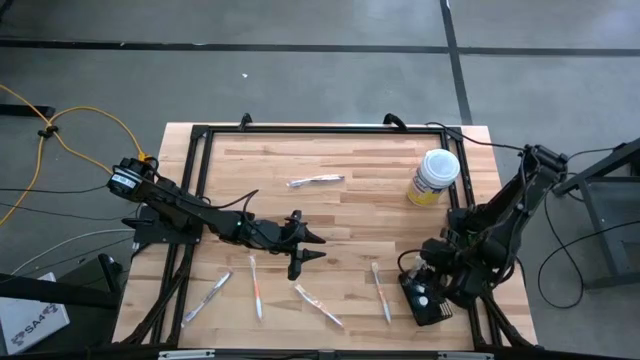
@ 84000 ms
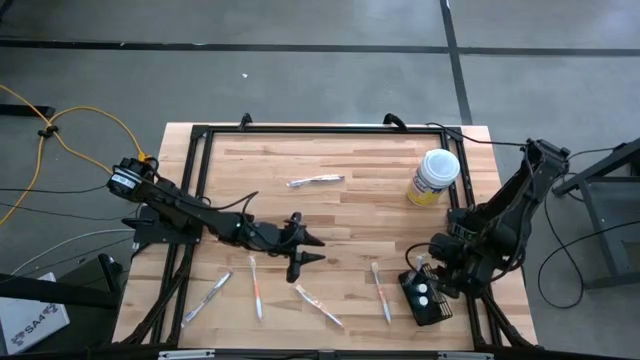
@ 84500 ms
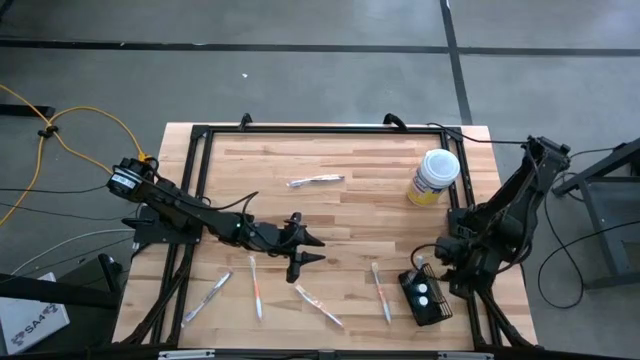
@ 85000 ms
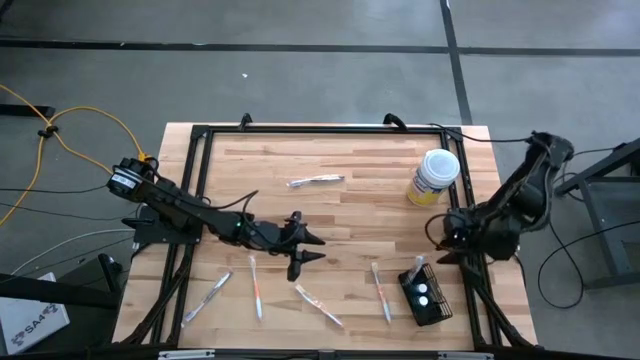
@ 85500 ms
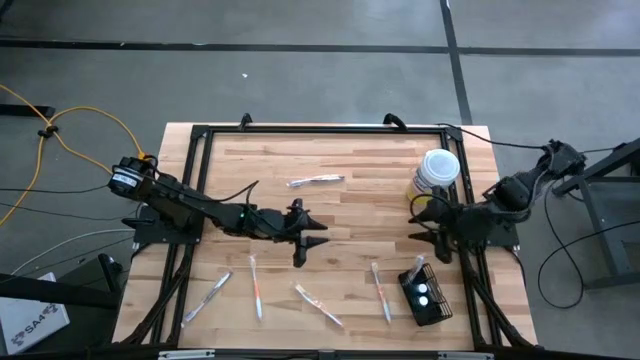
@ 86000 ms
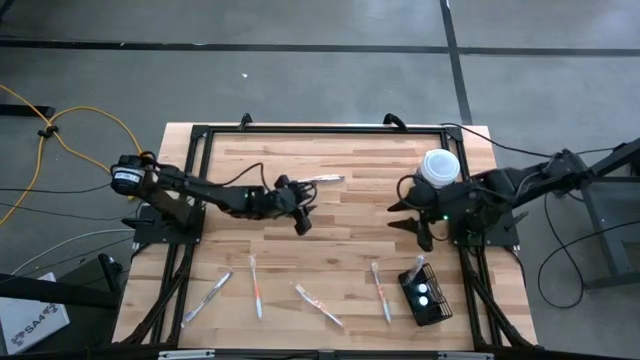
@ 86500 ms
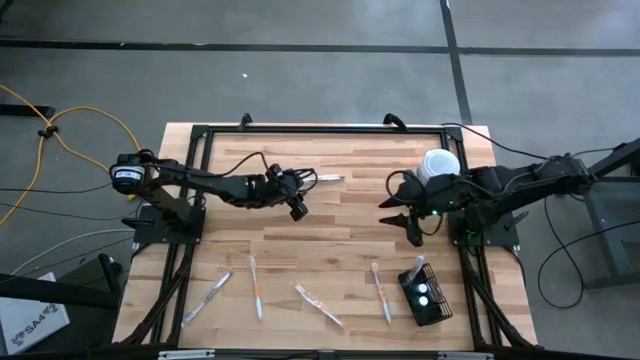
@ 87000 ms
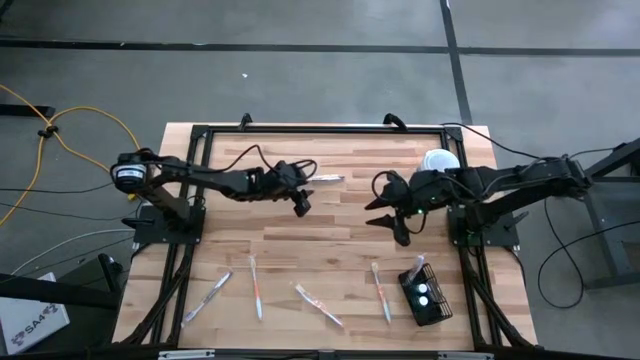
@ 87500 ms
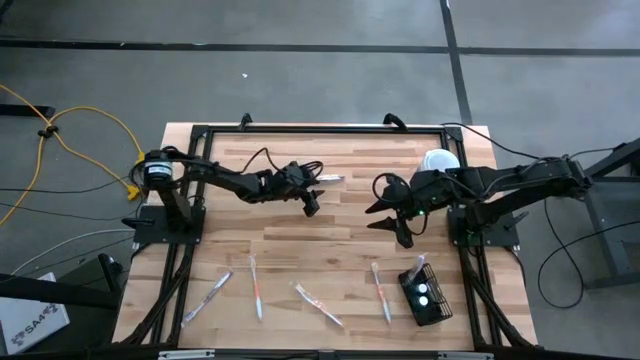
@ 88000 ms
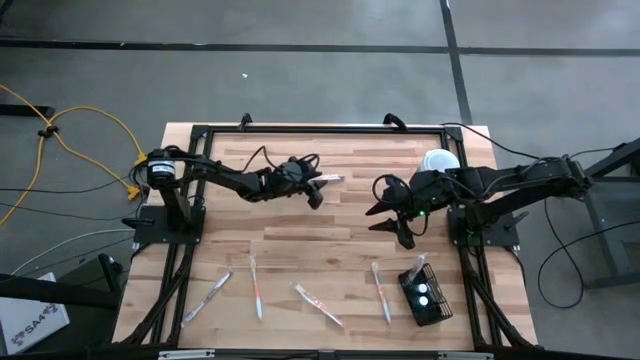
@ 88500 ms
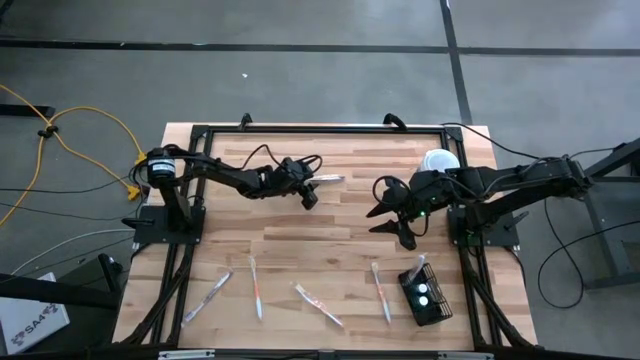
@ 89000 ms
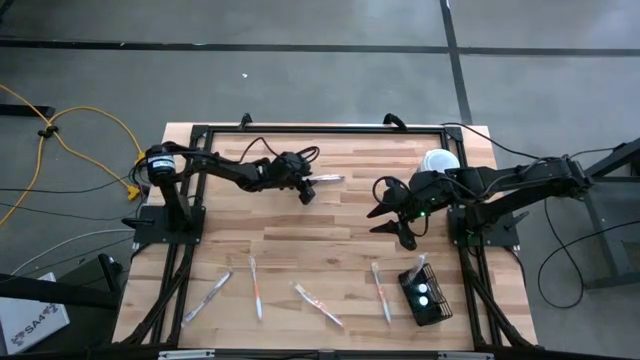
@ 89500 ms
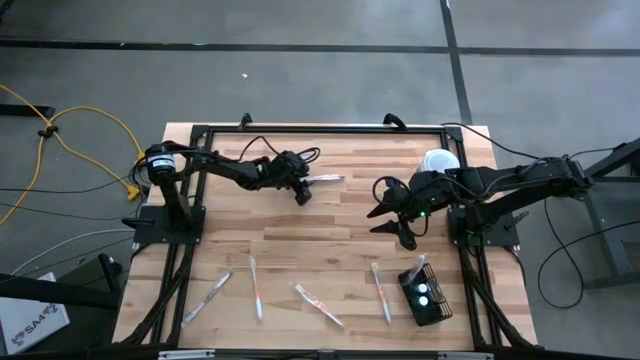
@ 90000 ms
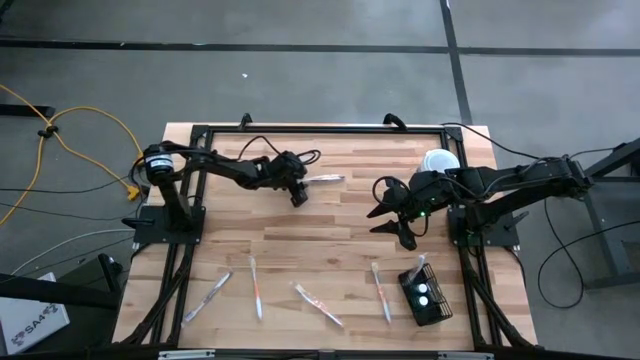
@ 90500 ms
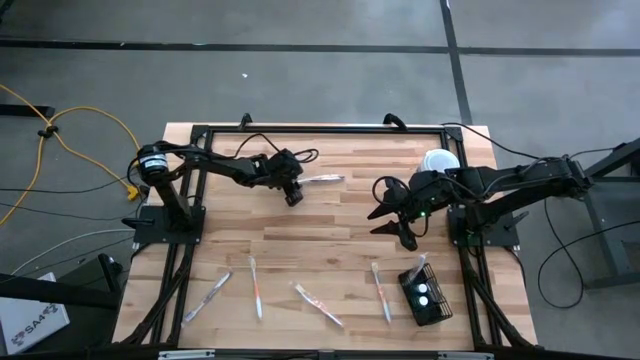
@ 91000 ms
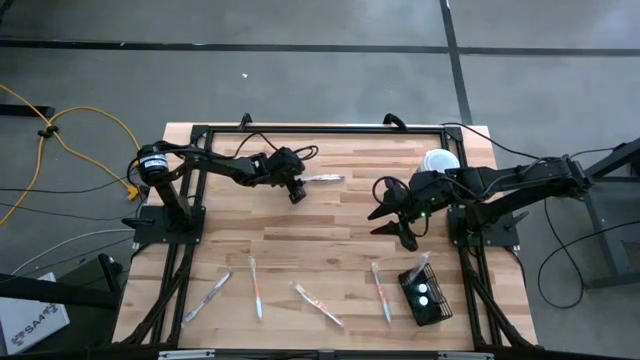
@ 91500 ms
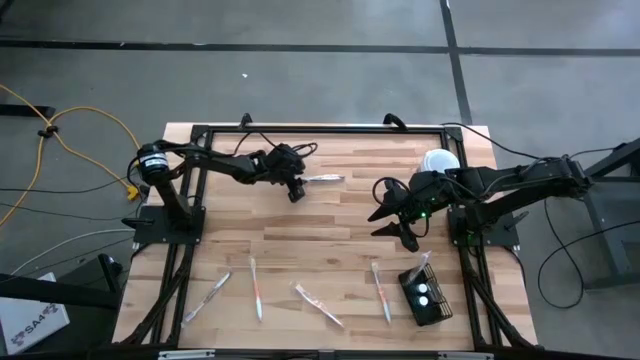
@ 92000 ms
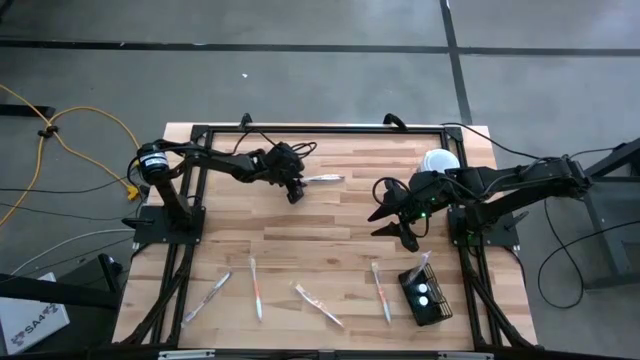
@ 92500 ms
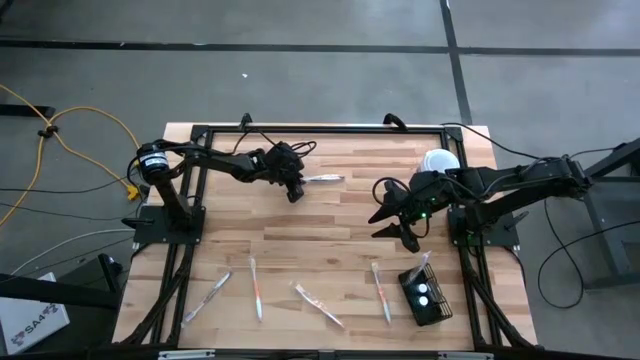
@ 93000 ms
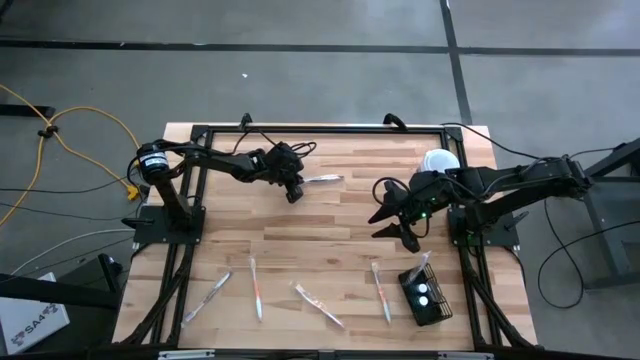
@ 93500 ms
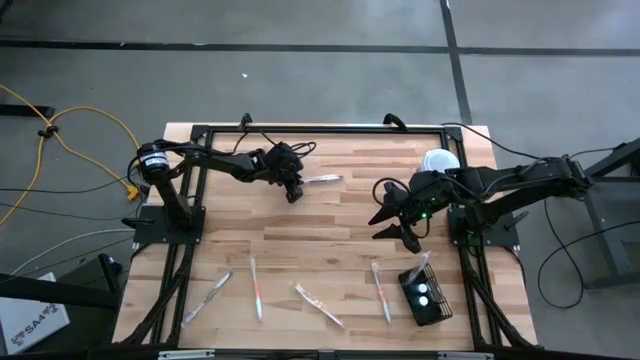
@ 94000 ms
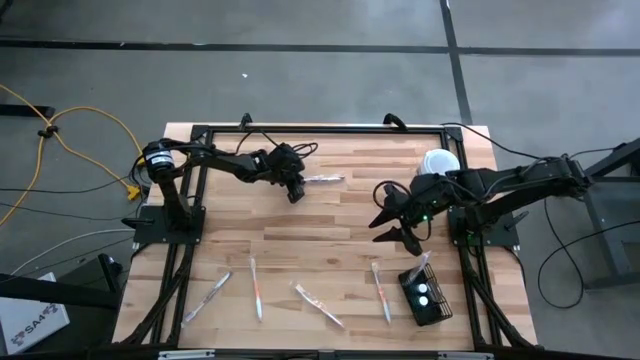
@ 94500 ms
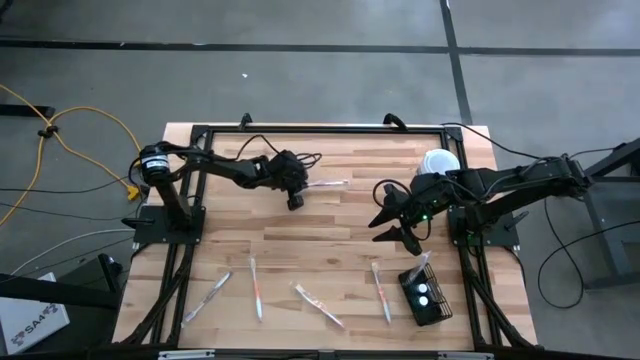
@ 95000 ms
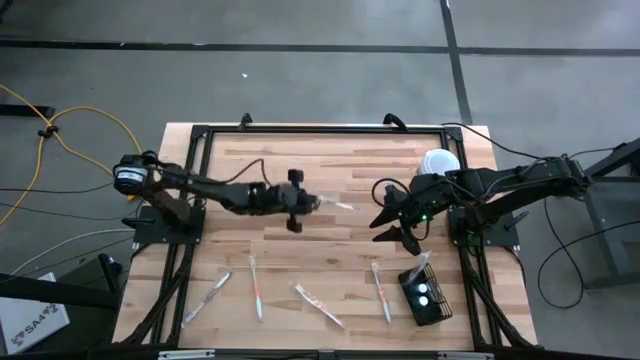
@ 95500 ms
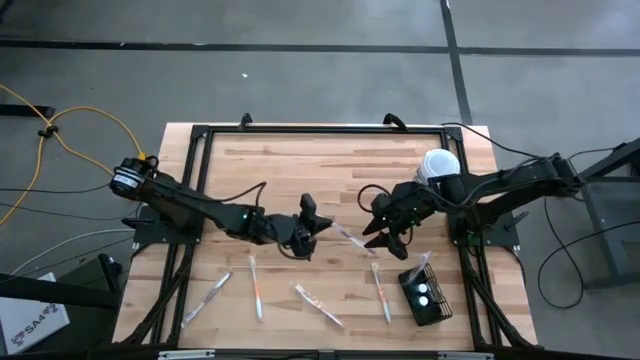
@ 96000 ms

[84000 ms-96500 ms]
Task: Pick & Place toothbrushing station
Put the purple toothbrush into the mesh organizer
